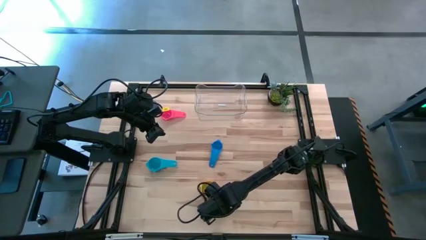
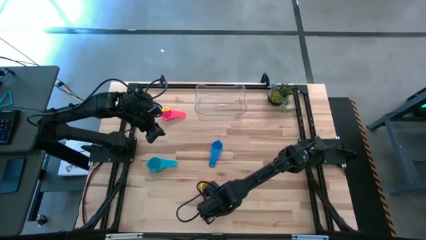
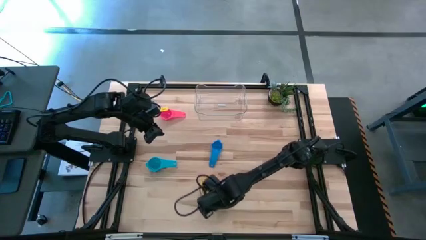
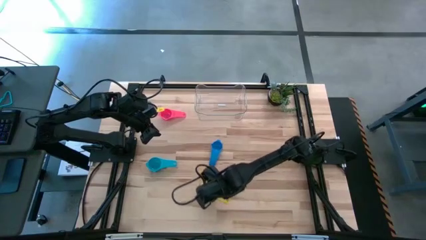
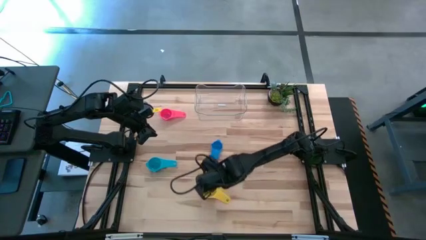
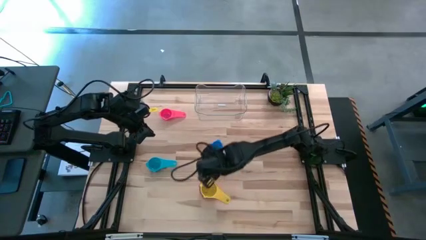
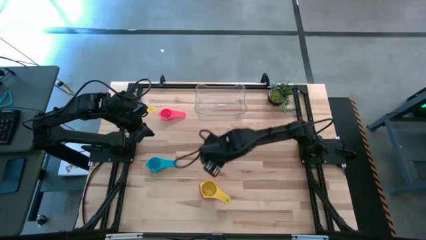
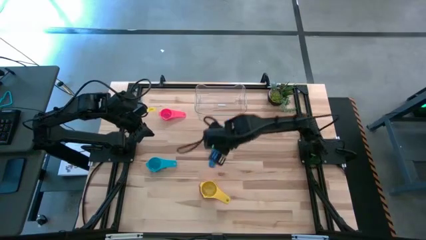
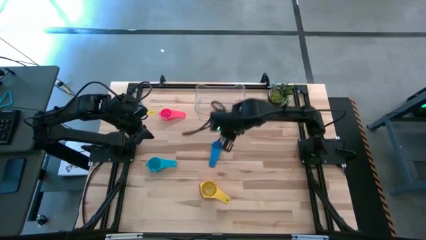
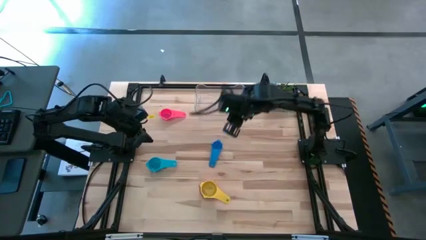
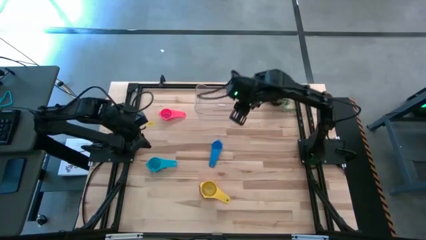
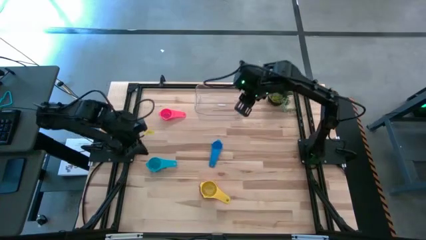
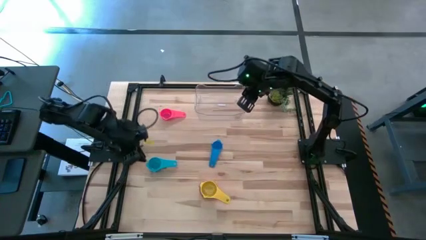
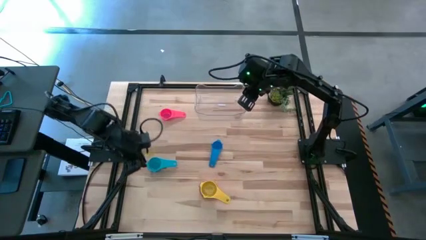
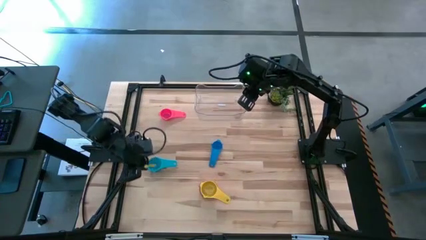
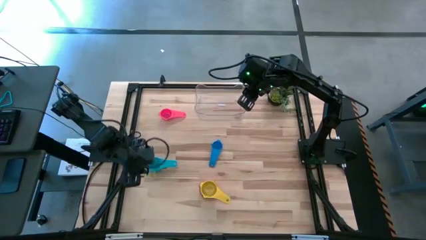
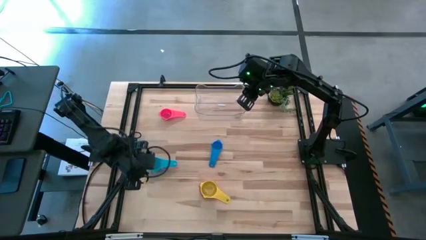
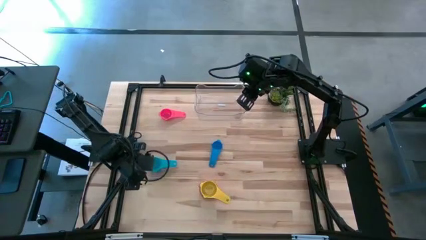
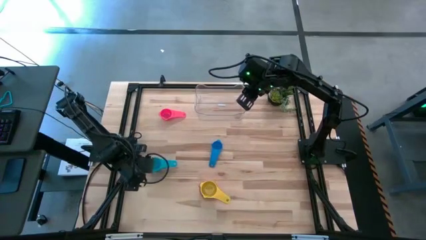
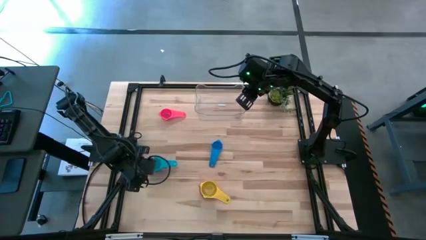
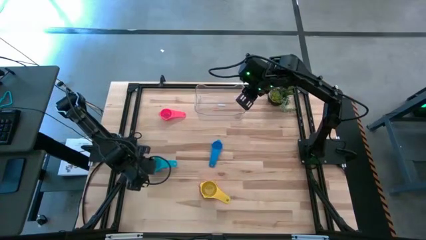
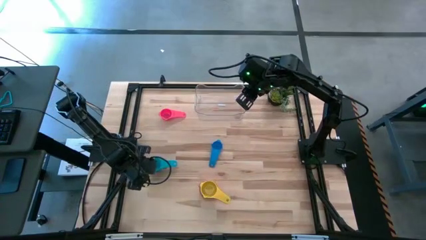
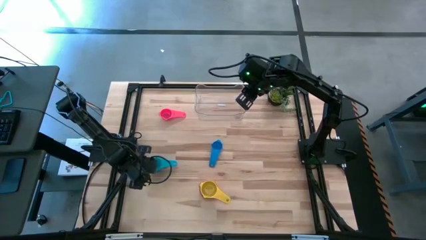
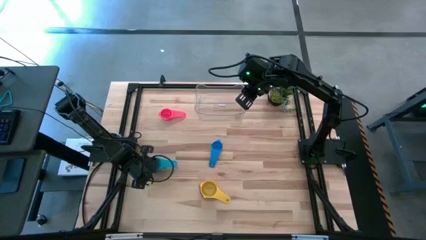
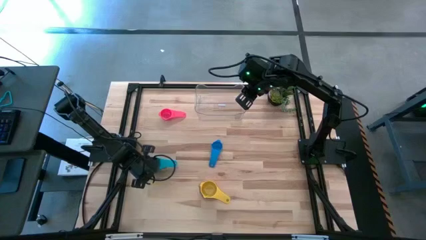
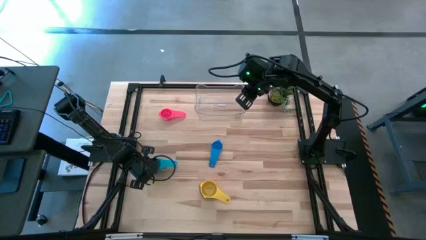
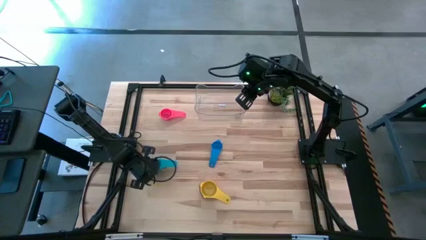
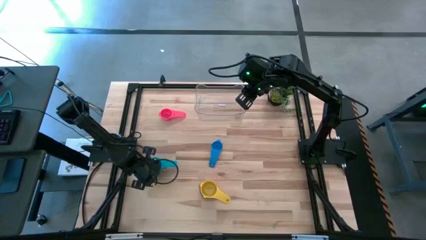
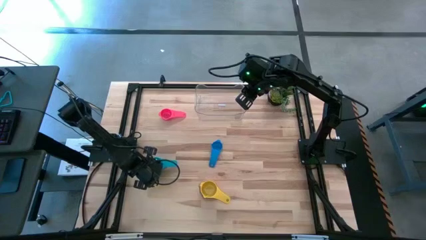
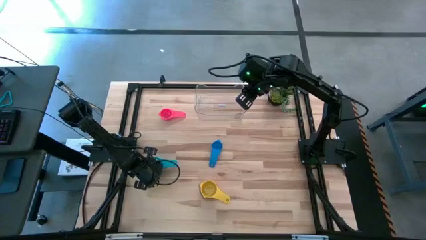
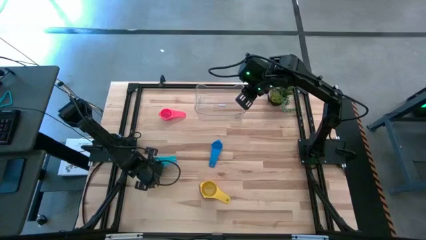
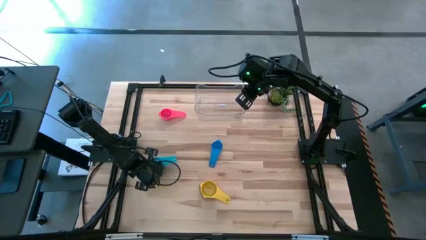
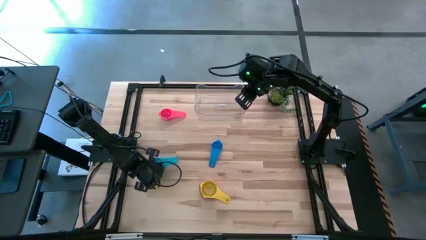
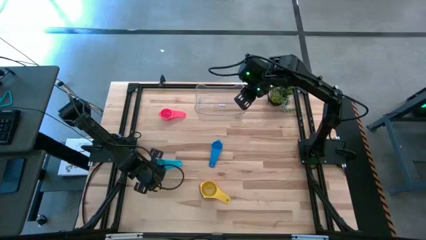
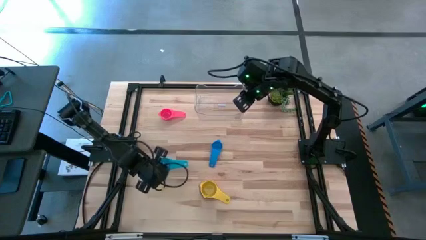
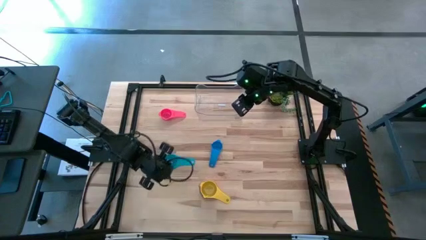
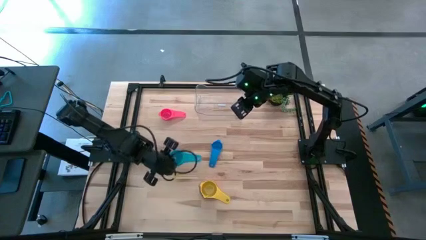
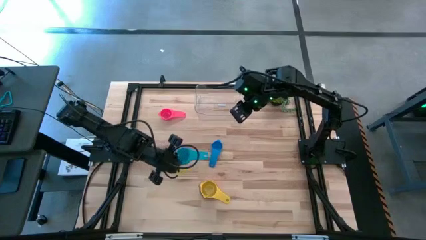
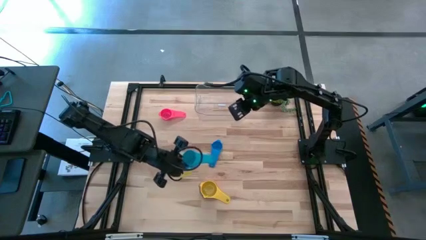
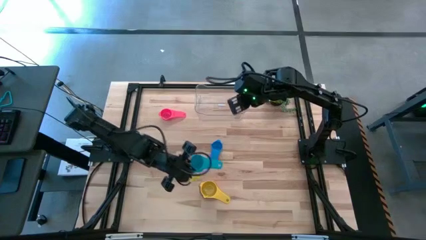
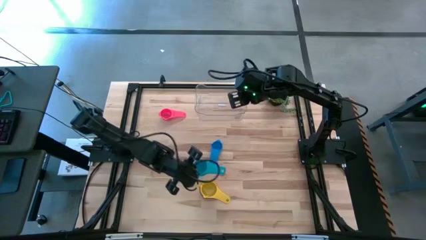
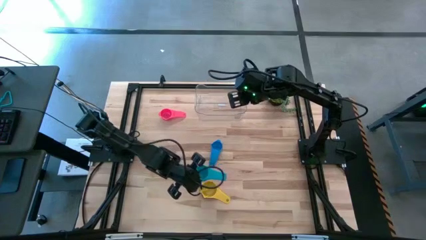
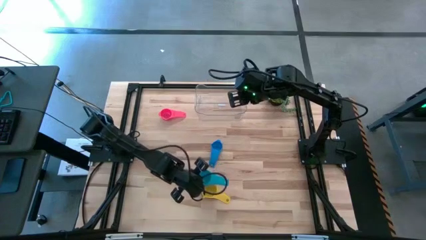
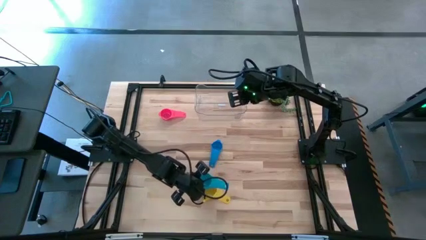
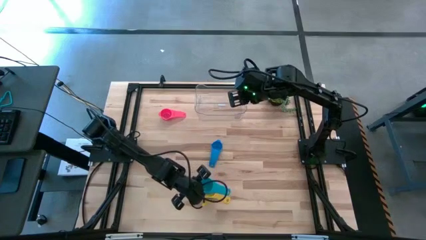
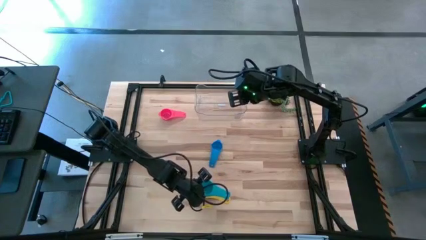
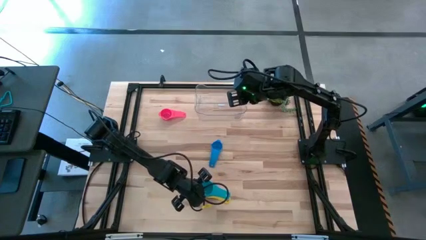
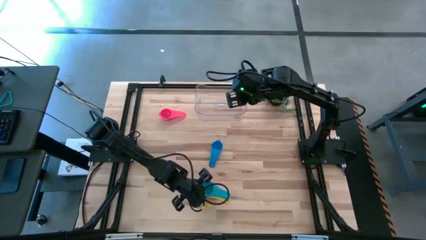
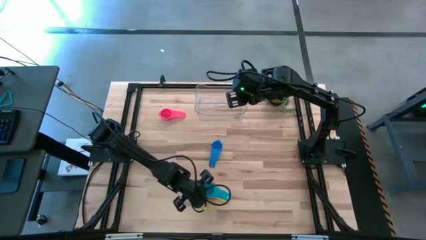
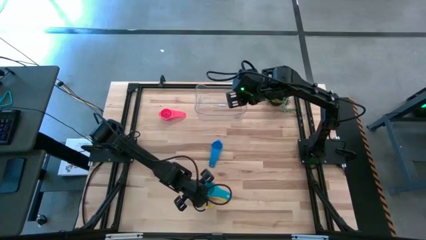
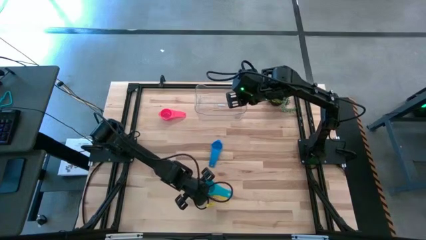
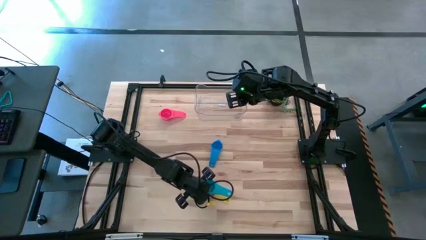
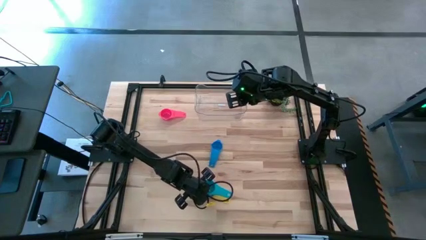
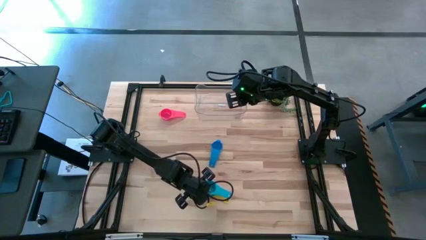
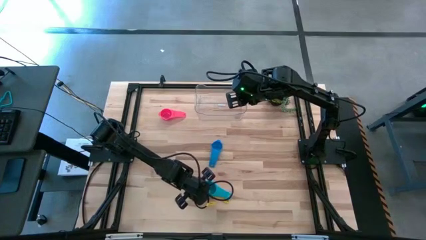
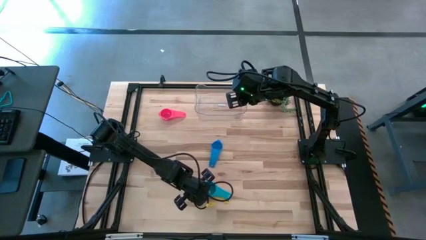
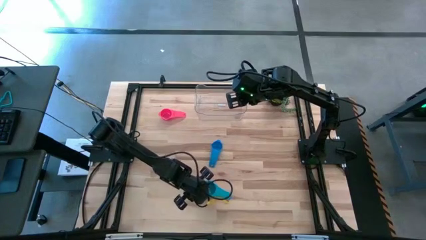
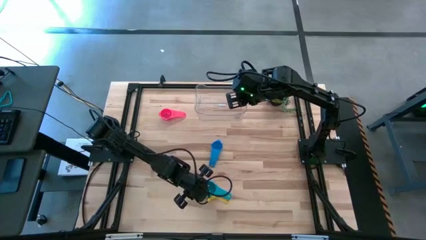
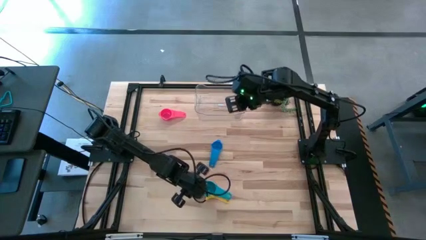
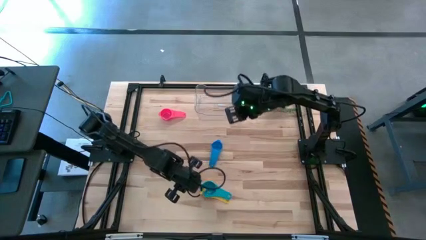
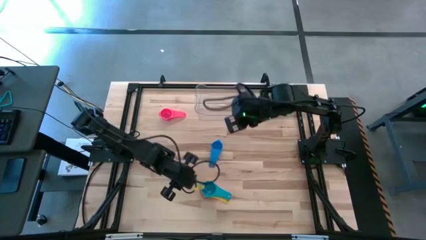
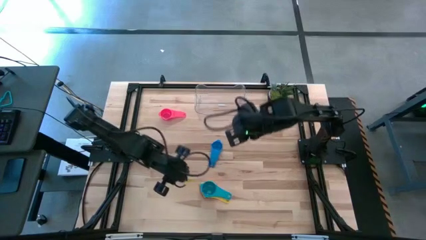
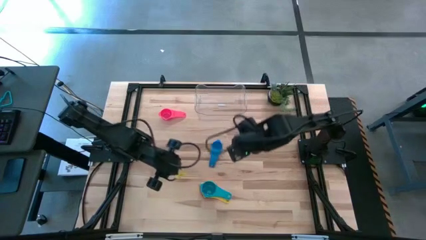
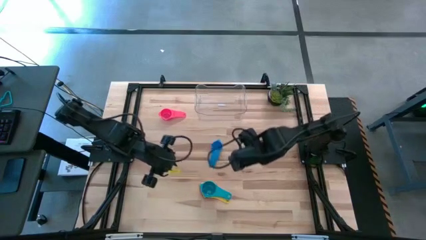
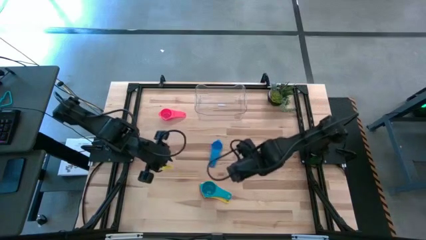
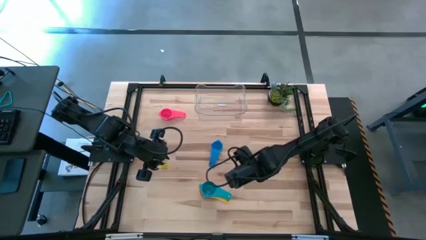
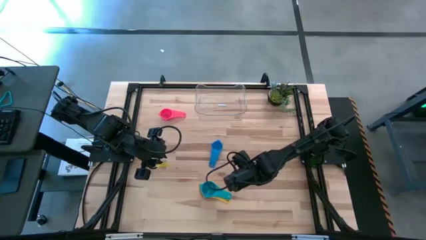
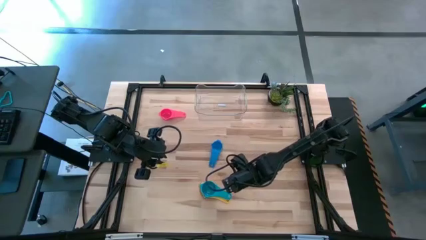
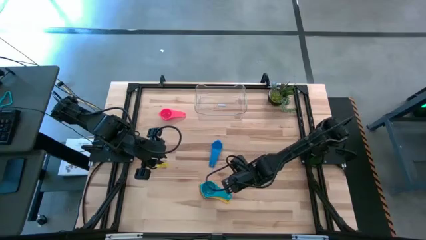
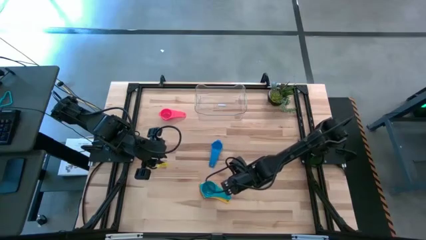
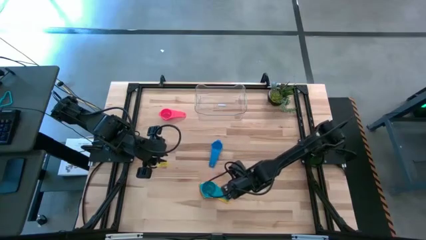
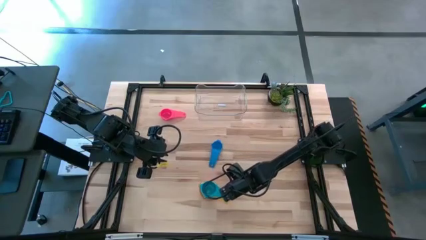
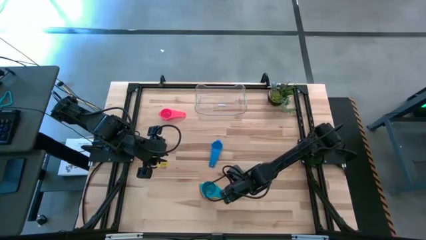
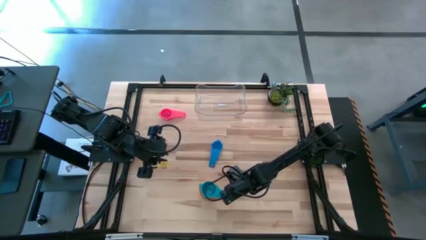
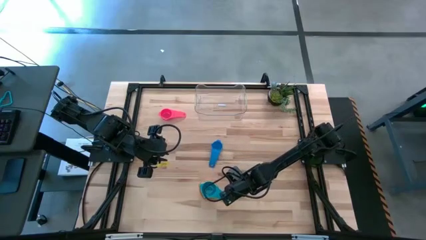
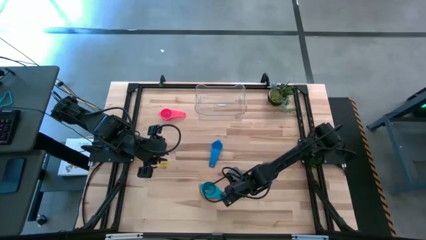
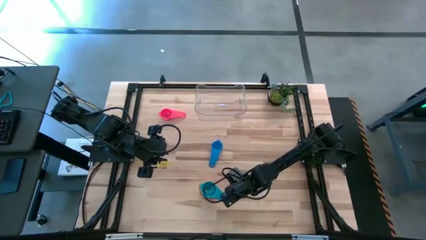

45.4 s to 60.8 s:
Task: Nest measuring cups in basket
Stack the light blue measuring cup in the yellow measuring cup

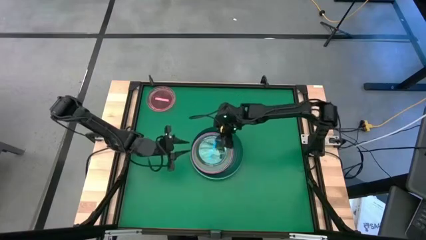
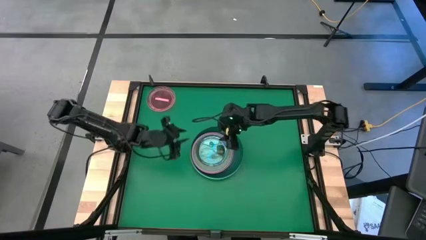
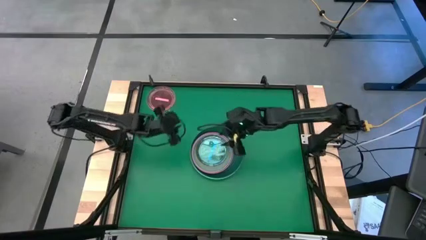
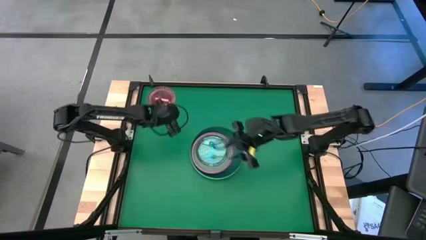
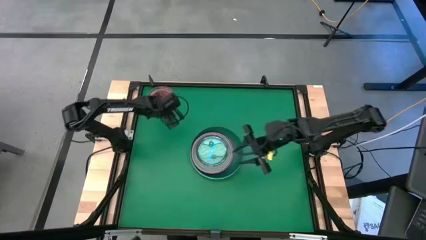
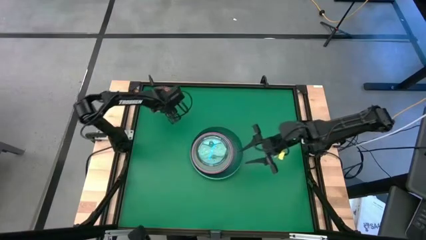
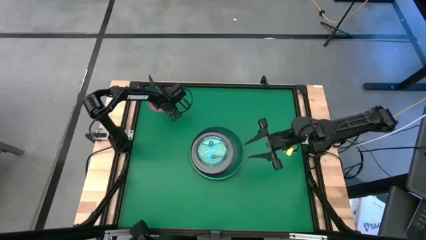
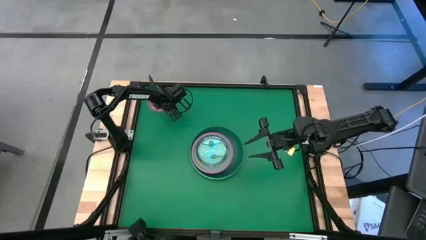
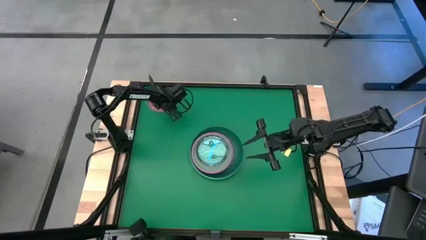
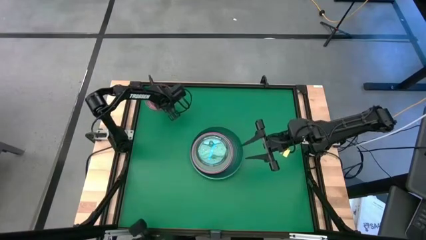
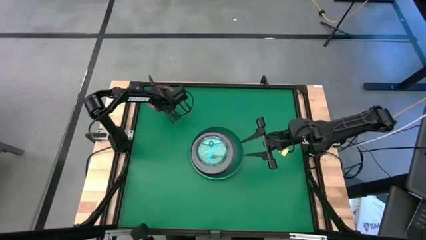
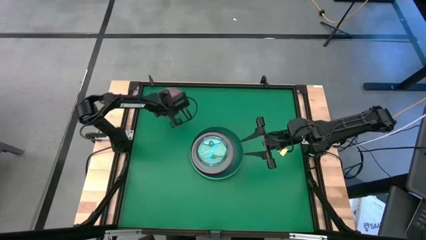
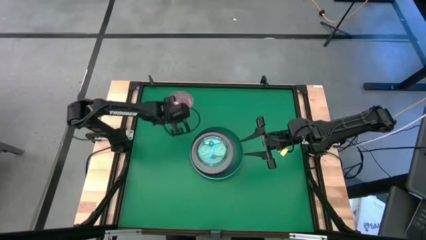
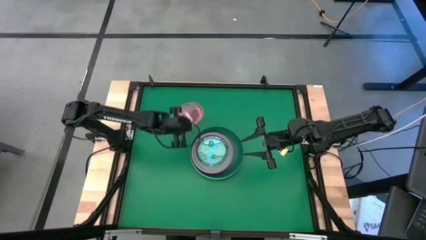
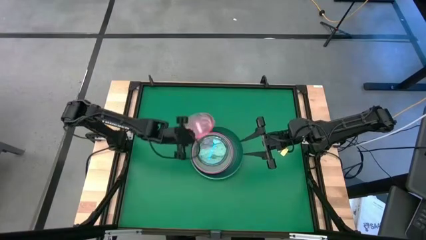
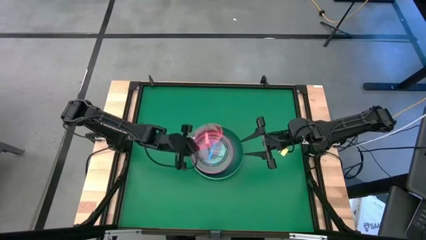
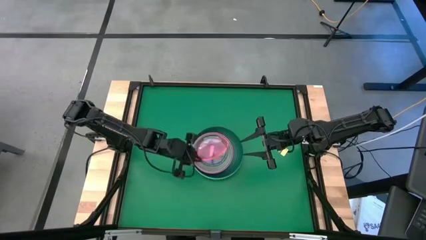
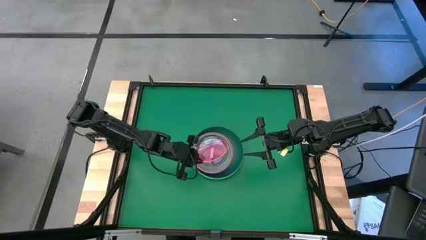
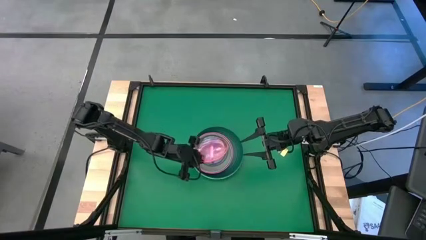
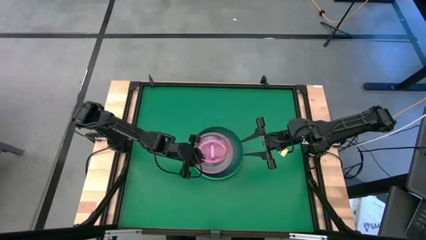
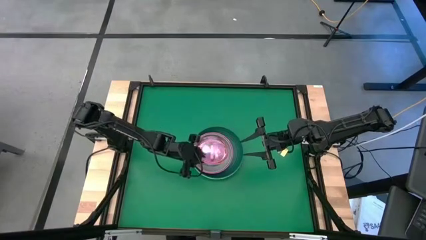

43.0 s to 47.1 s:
Task: Stack plastic plates
Stack the pink plate on top of the blue plate
